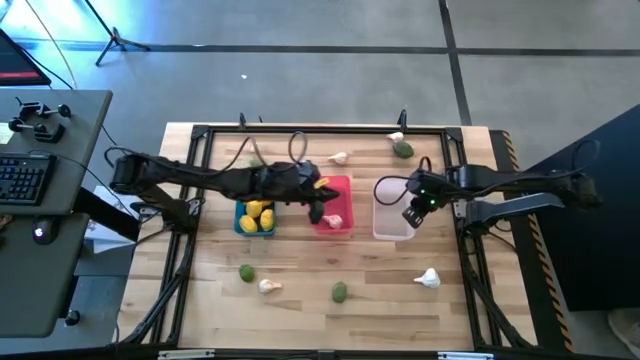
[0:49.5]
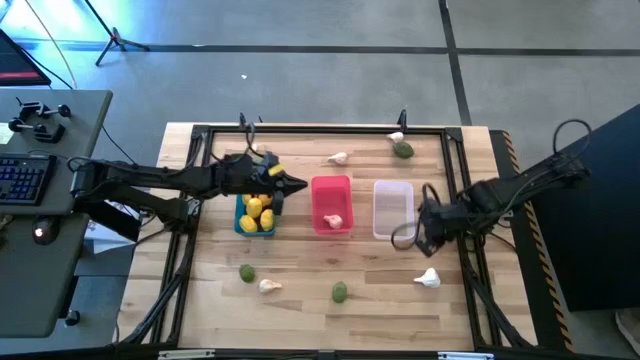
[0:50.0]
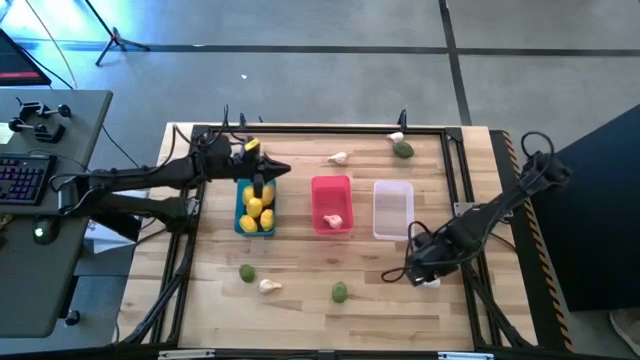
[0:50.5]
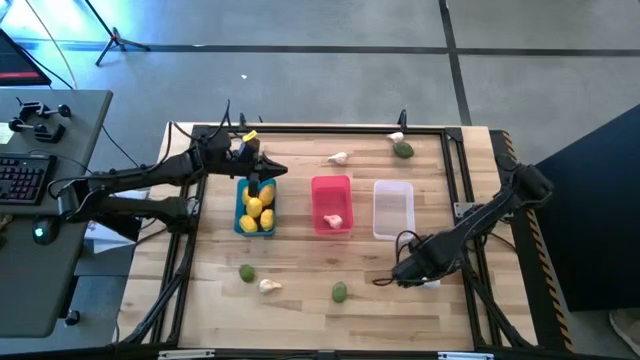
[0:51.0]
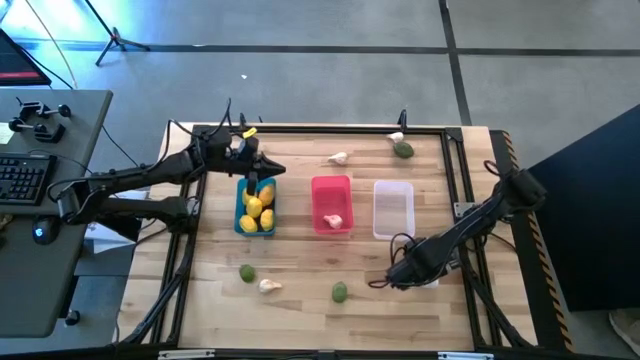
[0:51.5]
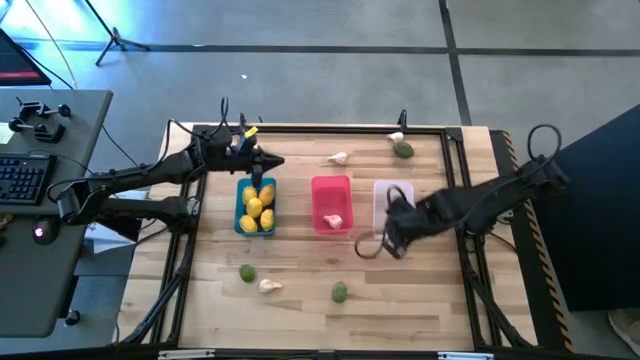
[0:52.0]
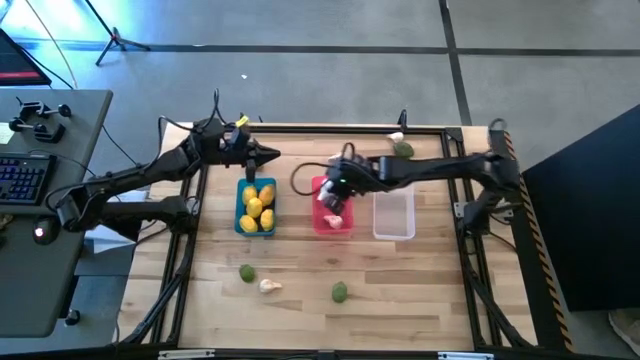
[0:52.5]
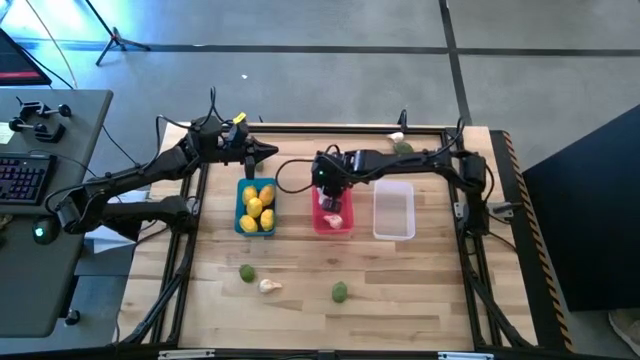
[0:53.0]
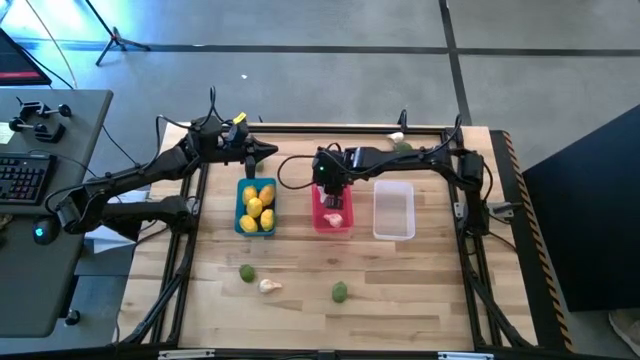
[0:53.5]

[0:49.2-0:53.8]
Task: Sort produce into baskets
Put the bottom right white garlic into the red bin

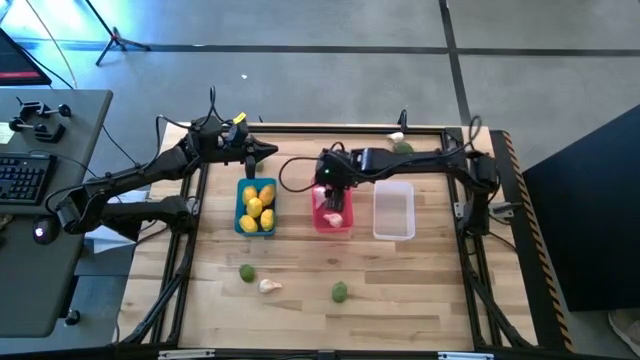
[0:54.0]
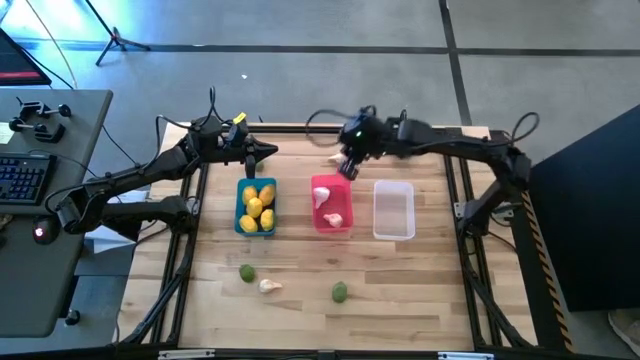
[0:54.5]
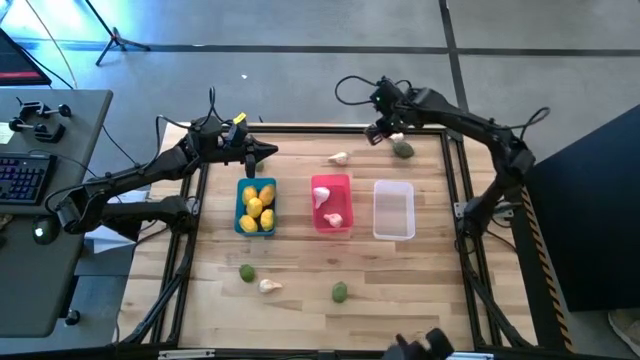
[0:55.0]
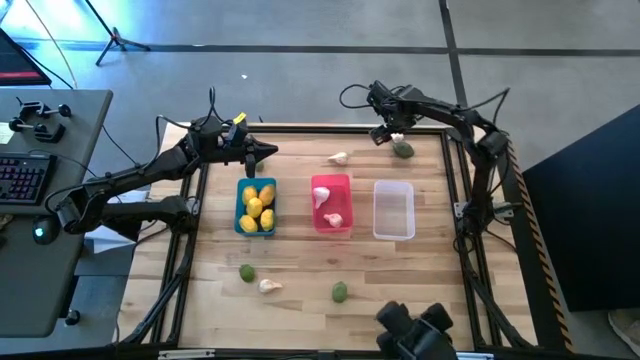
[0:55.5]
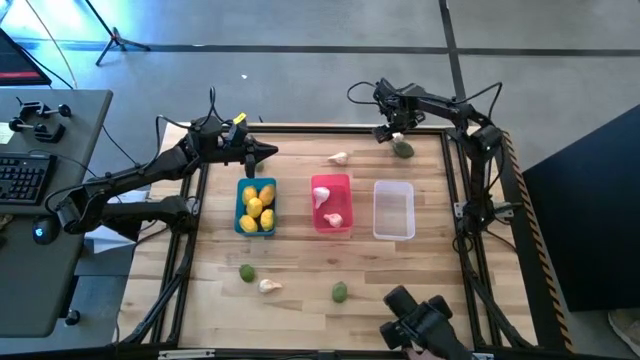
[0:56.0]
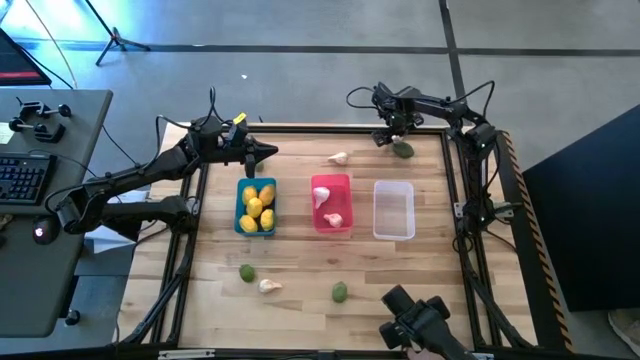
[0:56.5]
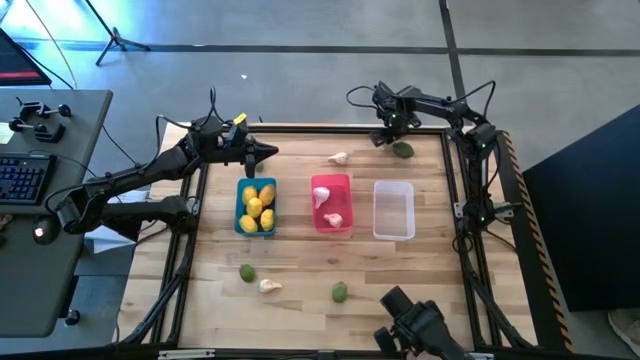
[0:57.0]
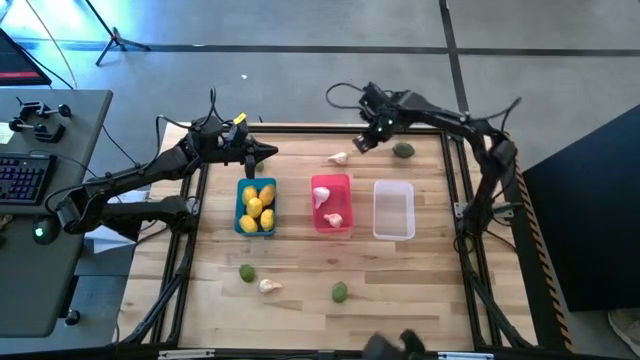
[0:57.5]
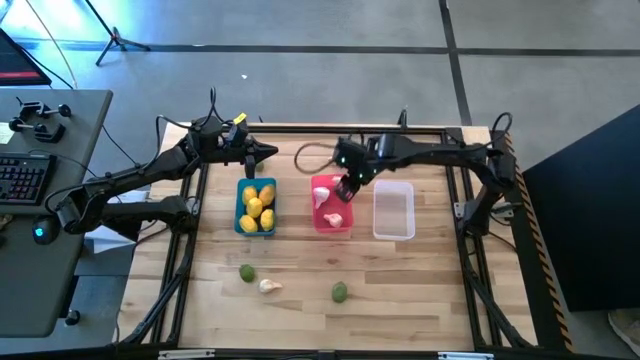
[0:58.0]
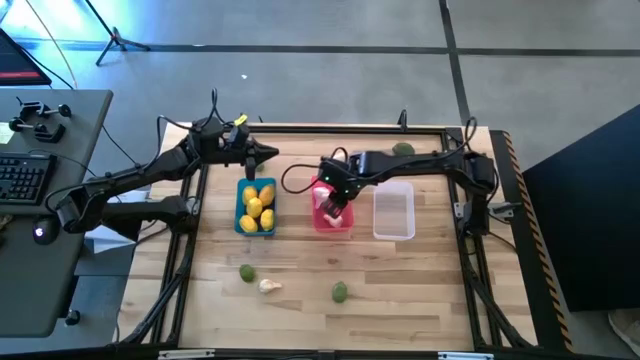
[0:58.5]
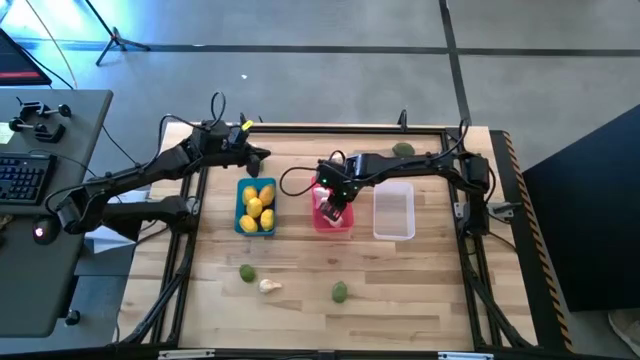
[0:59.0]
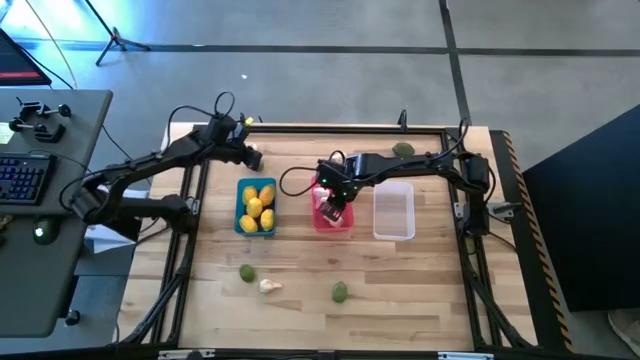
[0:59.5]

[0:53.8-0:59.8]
Put the top right white garlic into the red bin

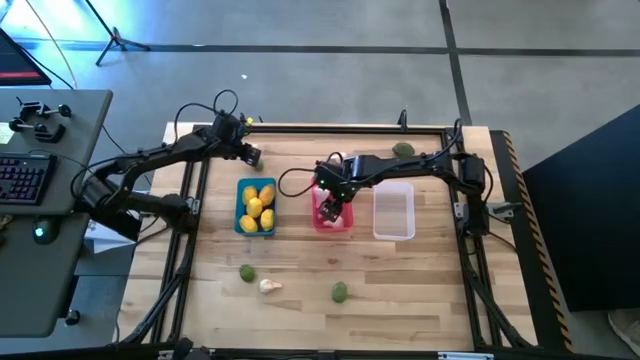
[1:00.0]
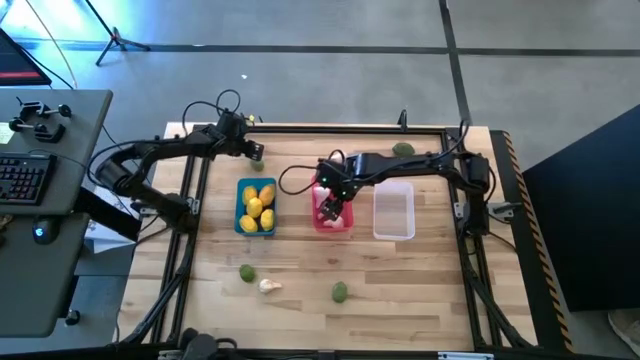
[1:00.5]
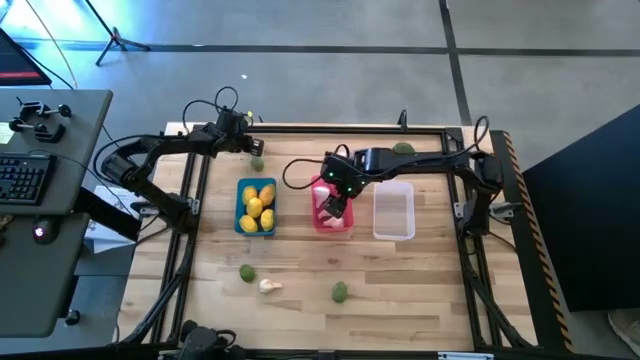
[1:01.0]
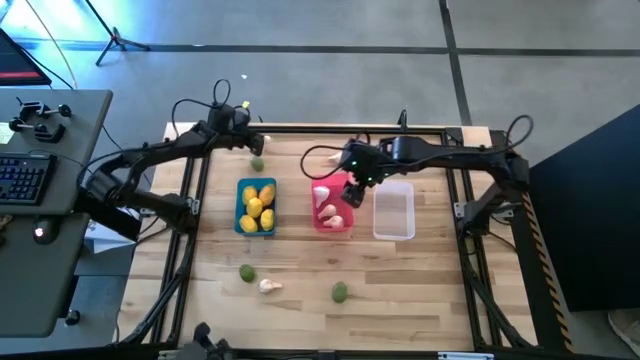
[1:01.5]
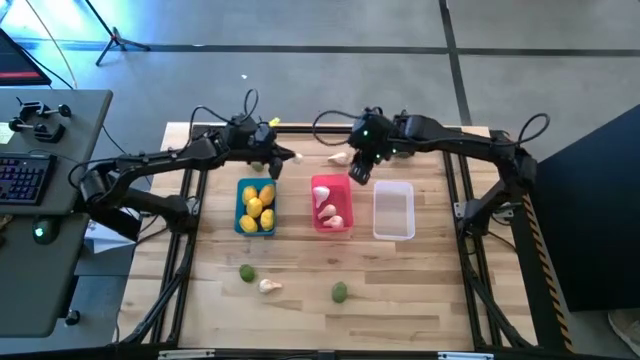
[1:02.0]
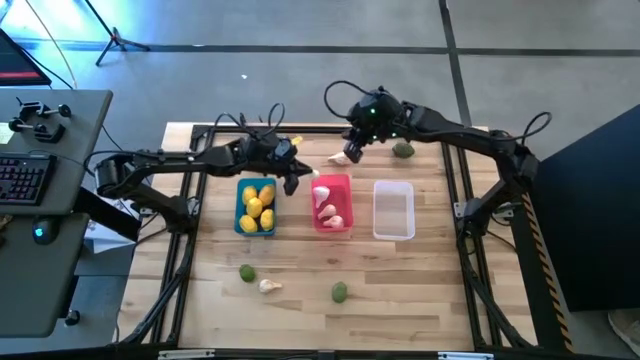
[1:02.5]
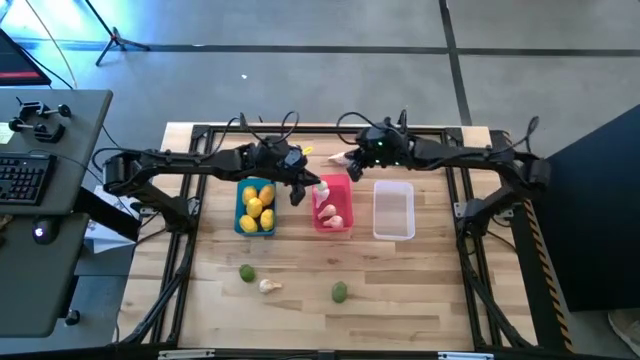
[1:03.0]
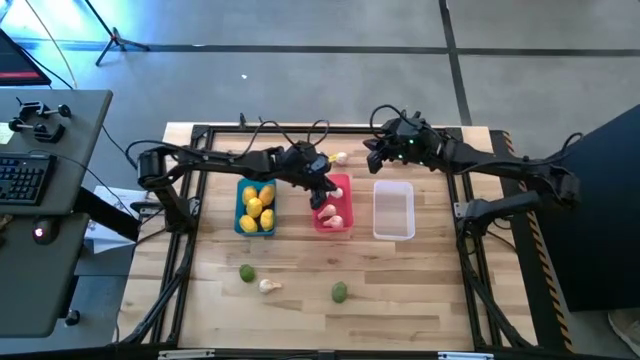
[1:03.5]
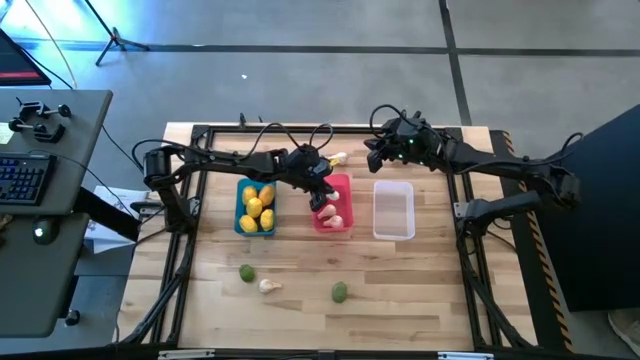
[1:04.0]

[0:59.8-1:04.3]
Put the top left white garlic into the red bin

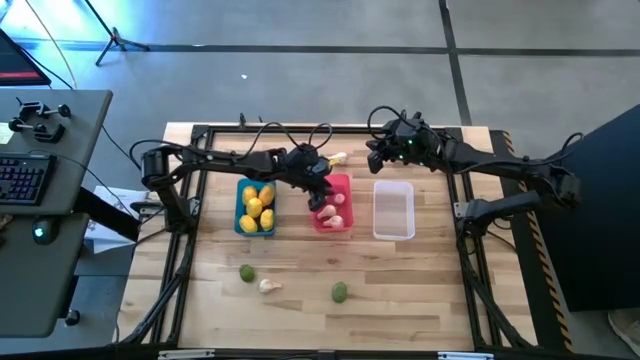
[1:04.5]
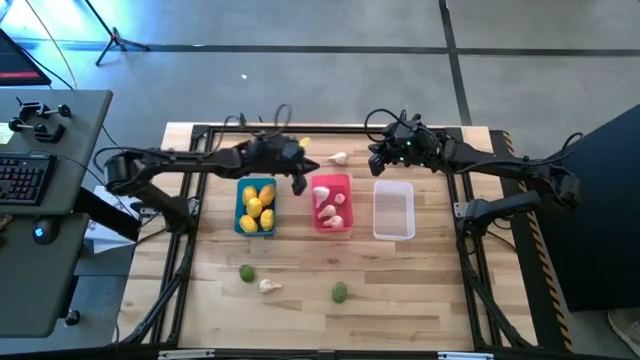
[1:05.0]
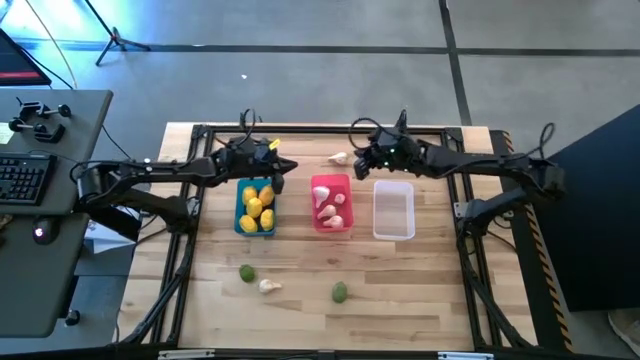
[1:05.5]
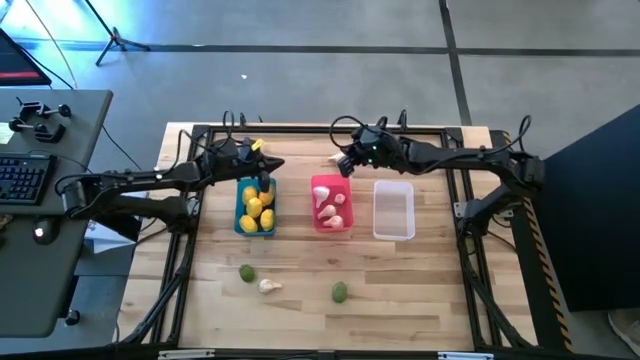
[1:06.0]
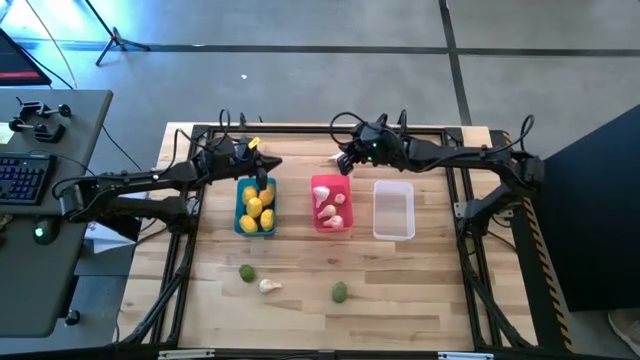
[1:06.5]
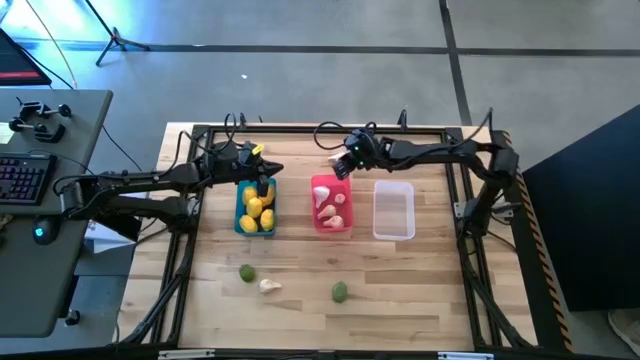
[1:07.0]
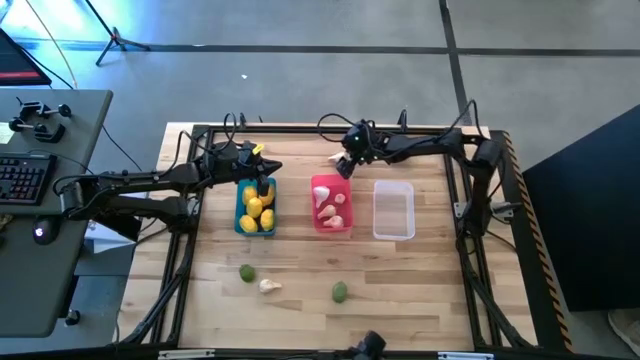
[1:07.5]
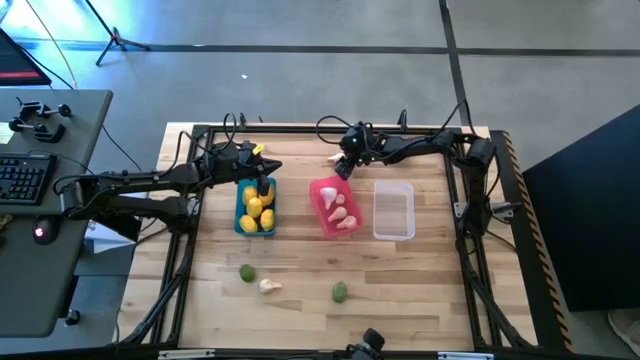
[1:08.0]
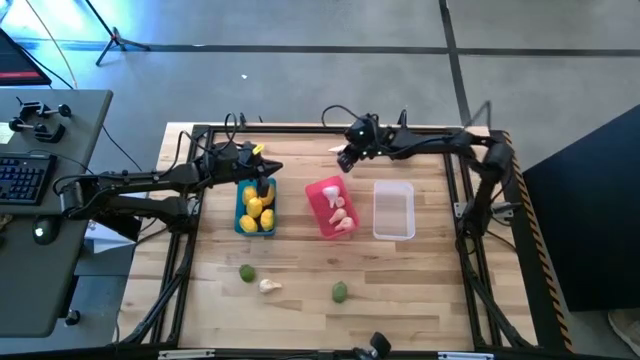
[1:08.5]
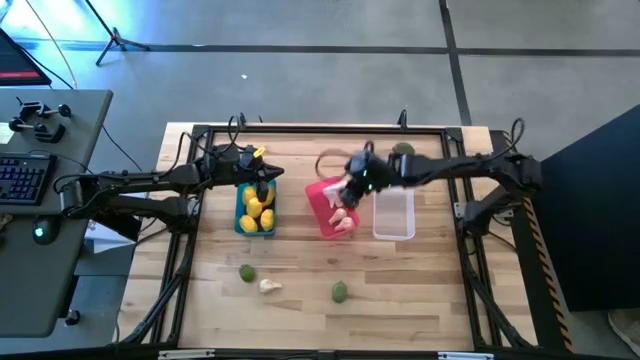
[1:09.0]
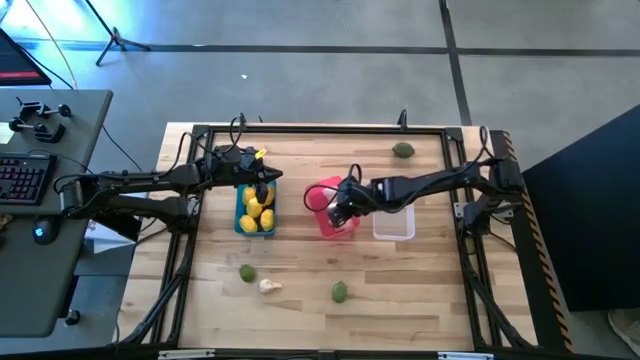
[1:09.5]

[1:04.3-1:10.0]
Put the top white garlic into the red bin

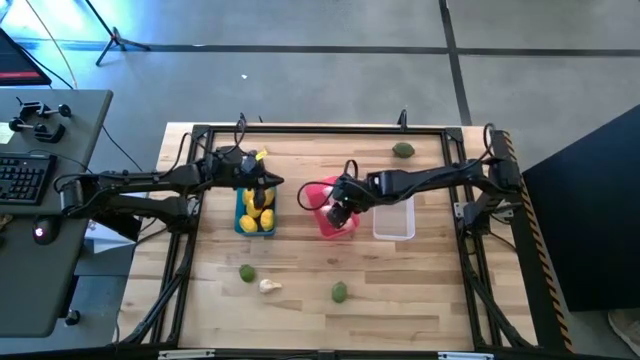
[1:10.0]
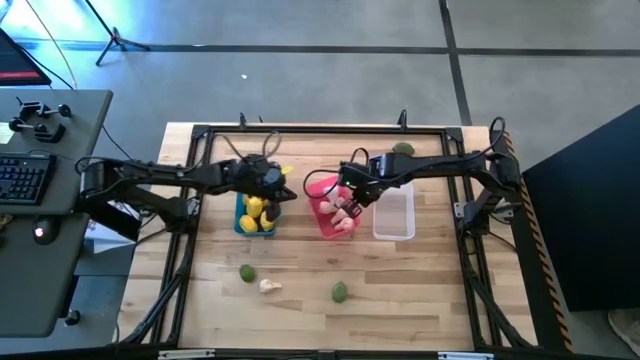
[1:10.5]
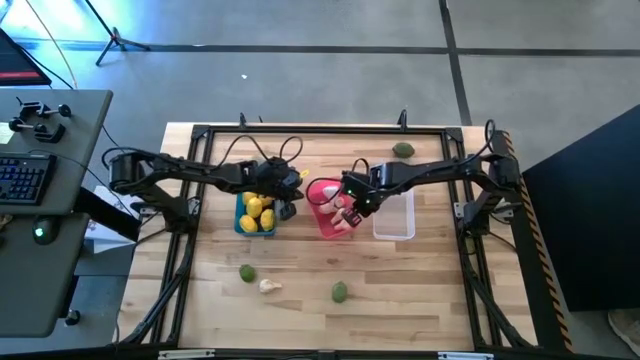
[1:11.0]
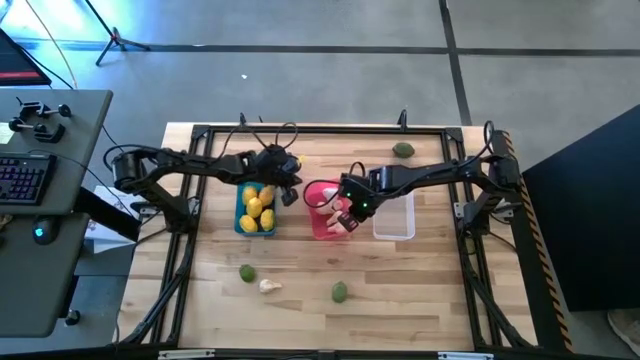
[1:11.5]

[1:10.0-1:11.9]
Adjust the red bin
